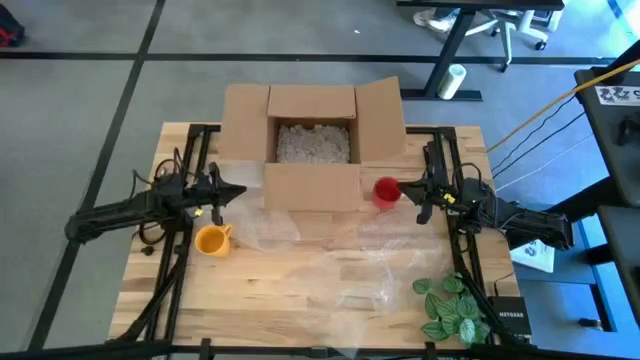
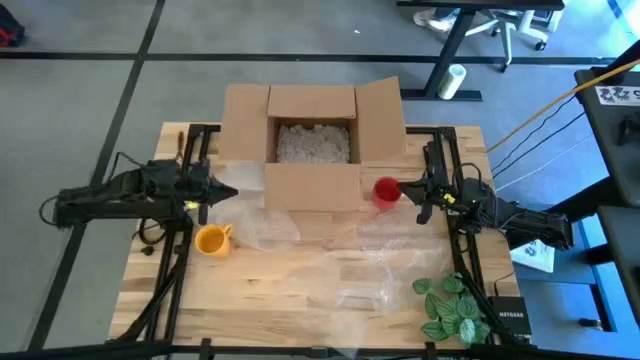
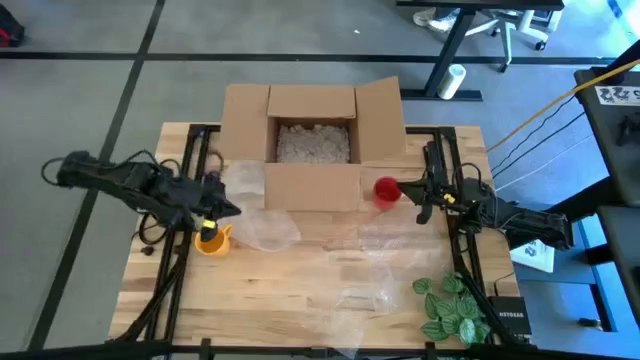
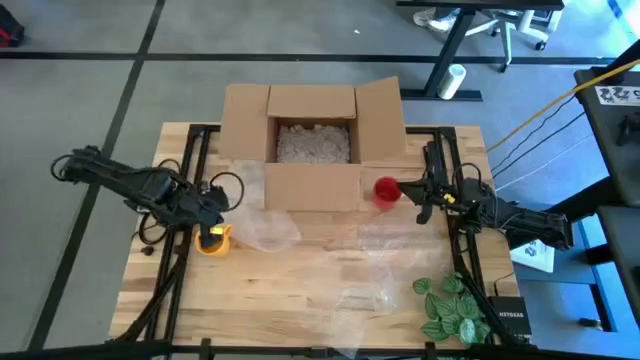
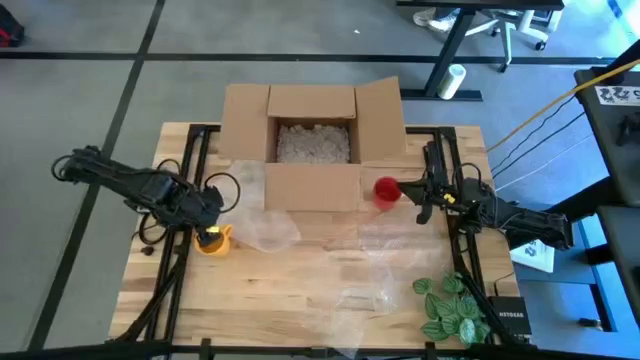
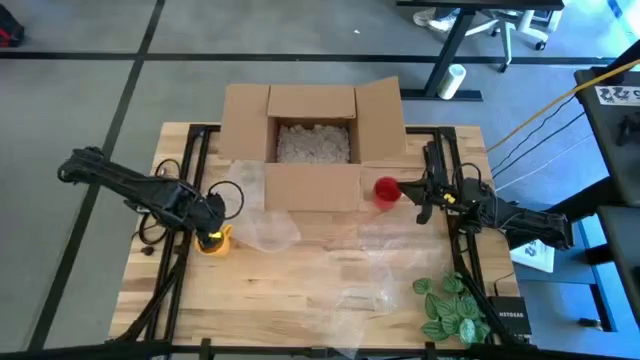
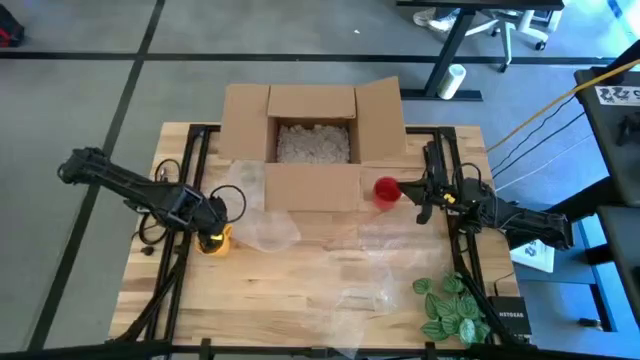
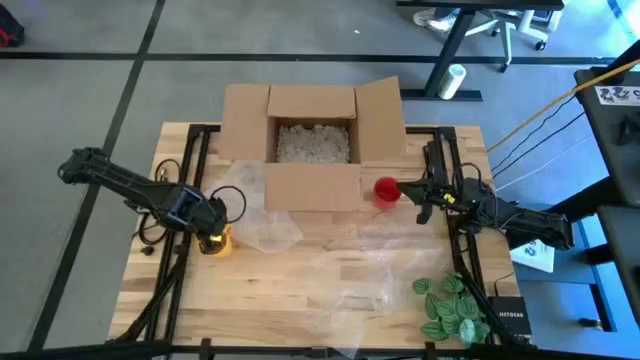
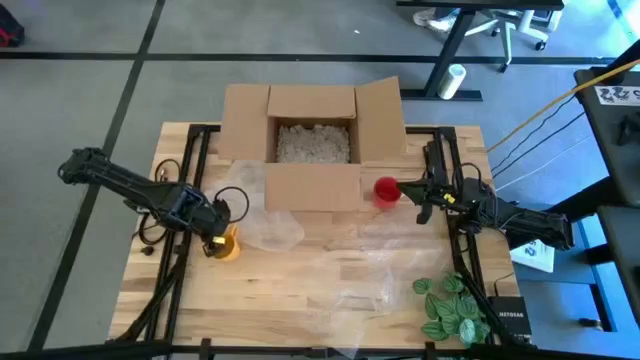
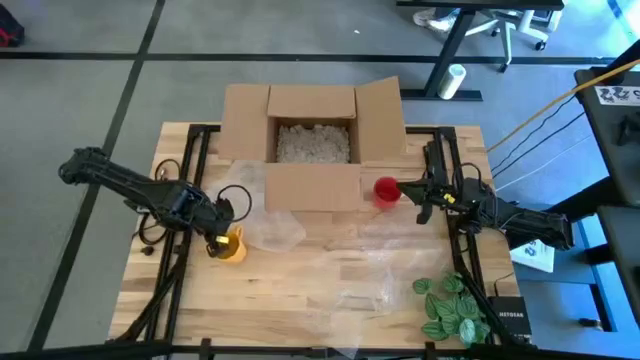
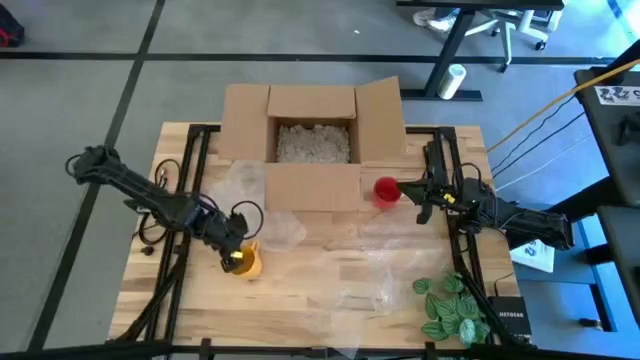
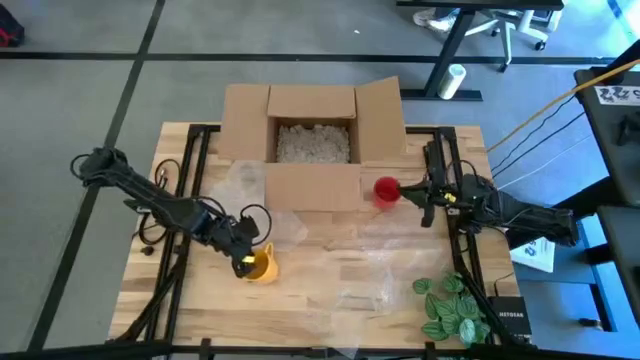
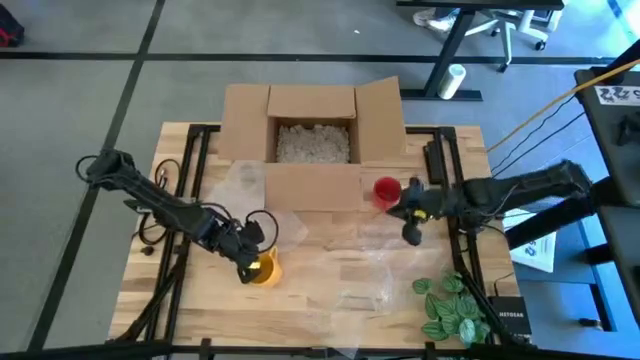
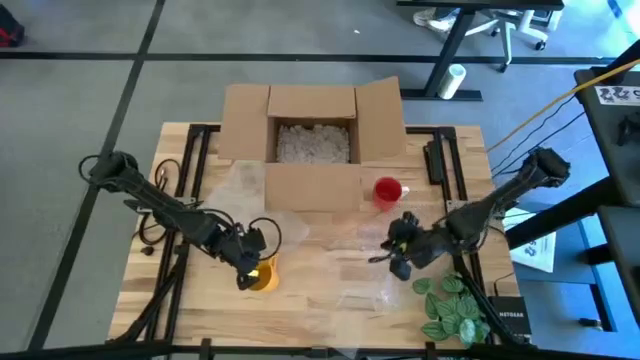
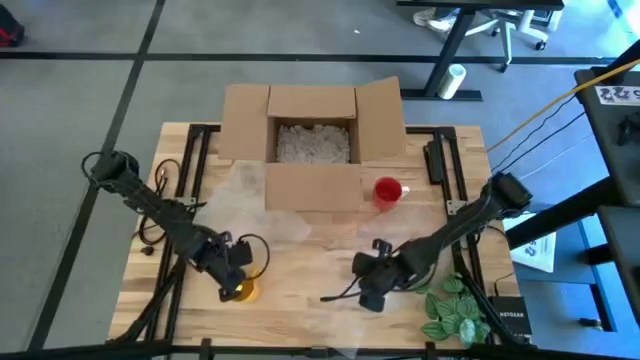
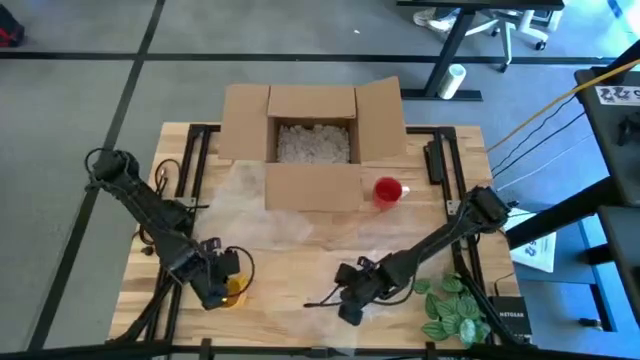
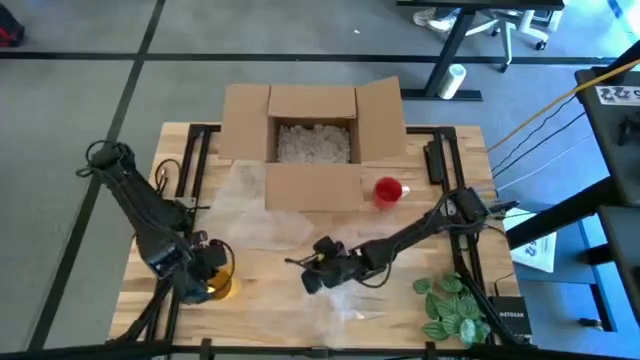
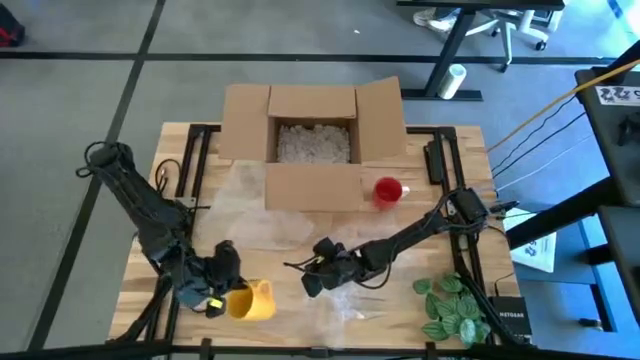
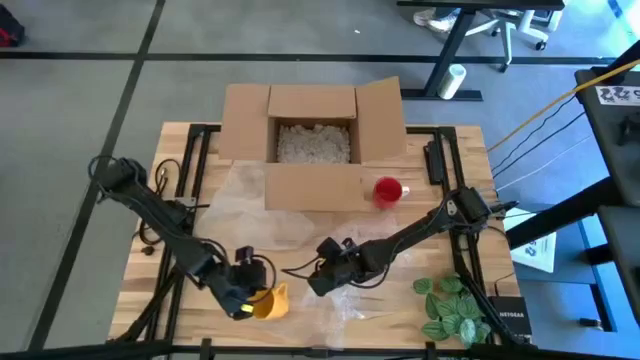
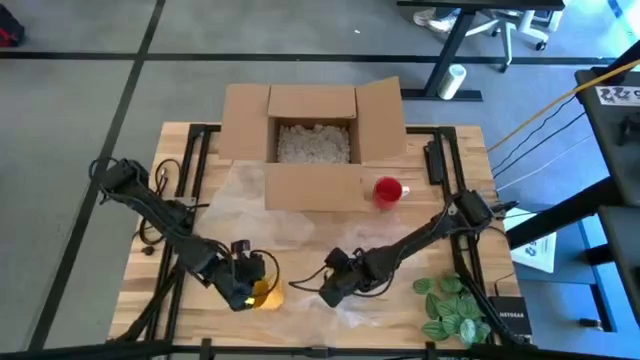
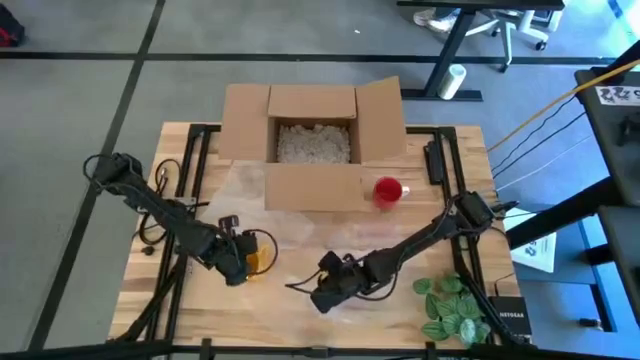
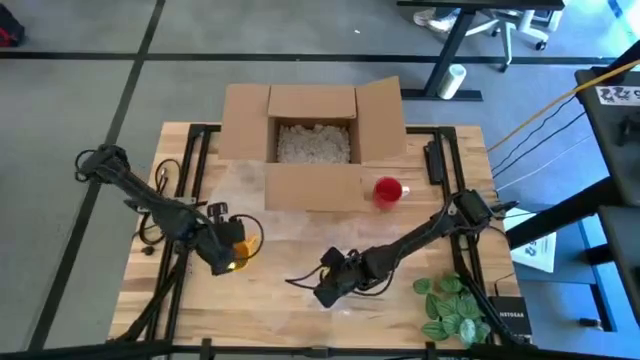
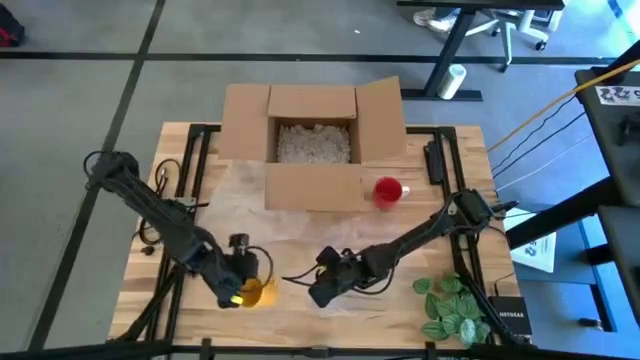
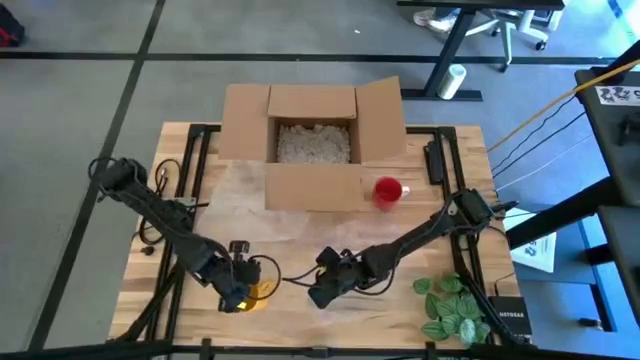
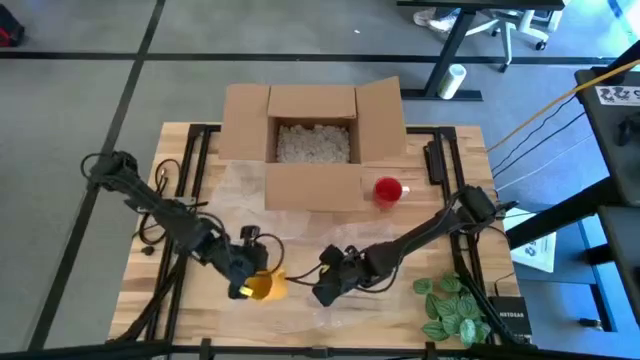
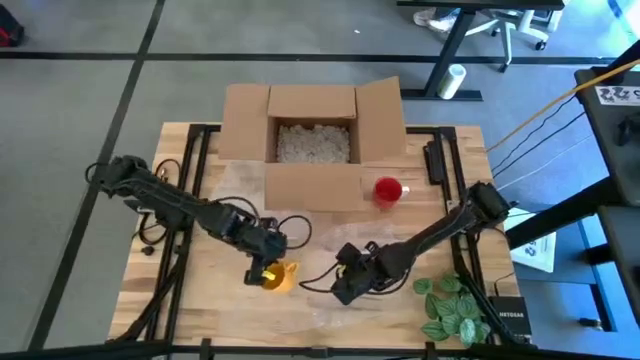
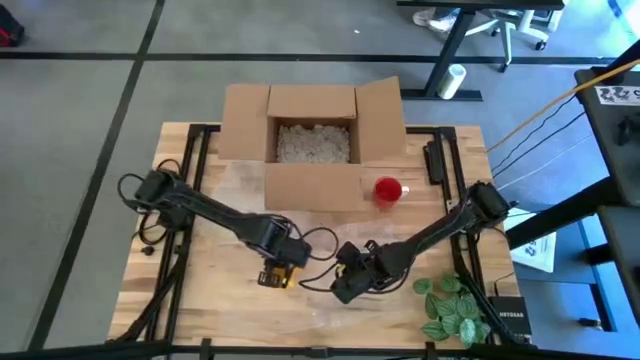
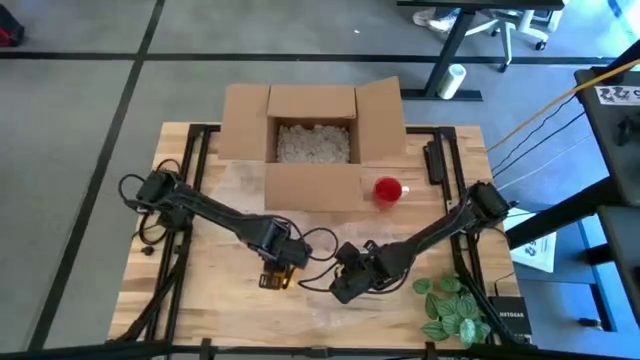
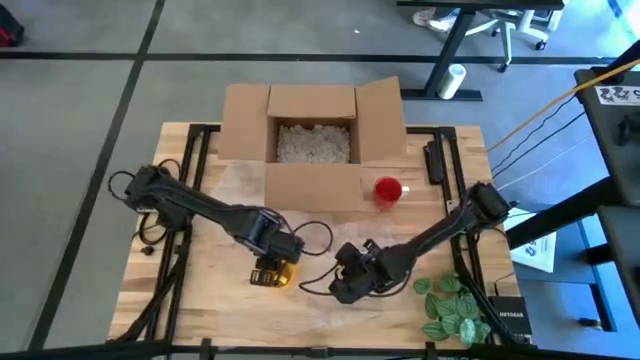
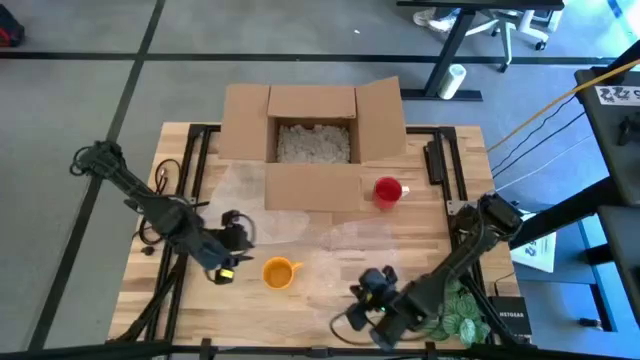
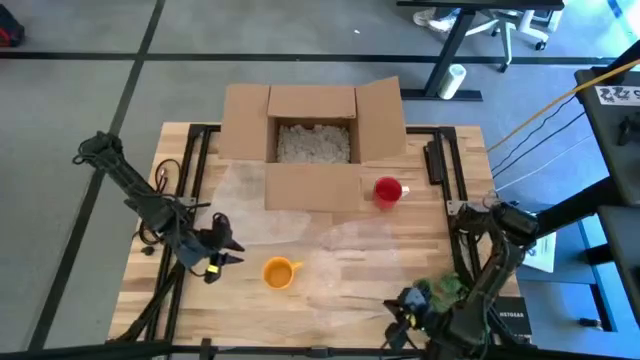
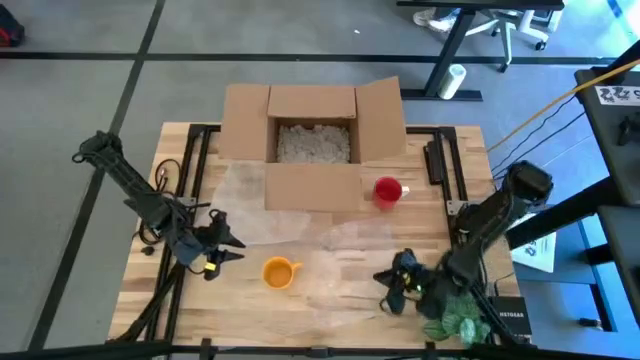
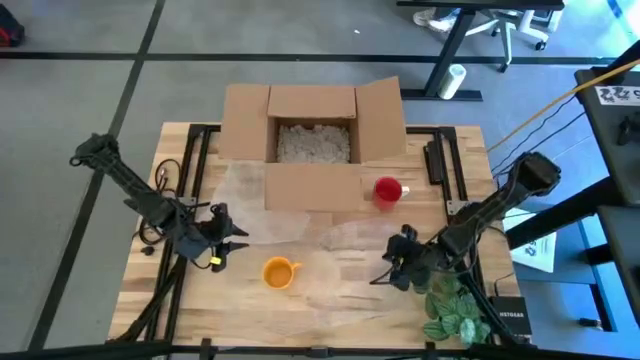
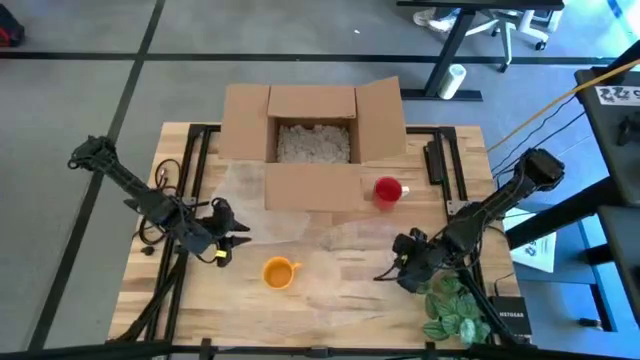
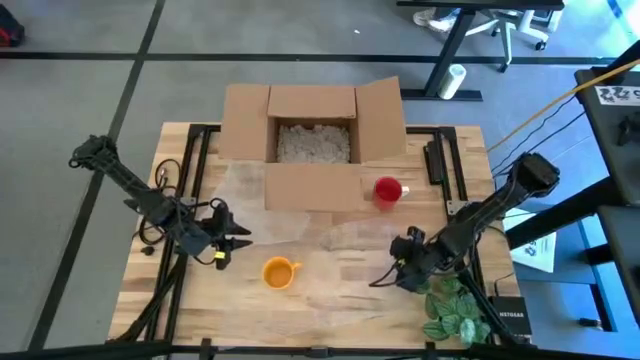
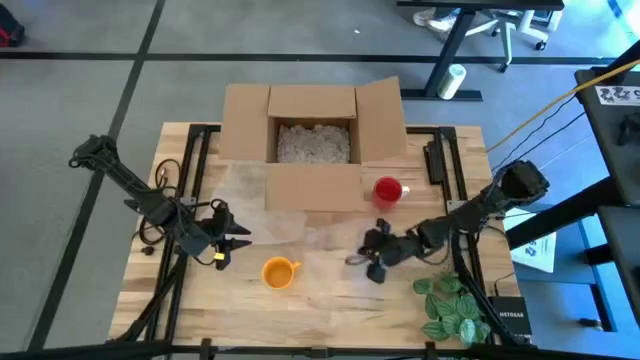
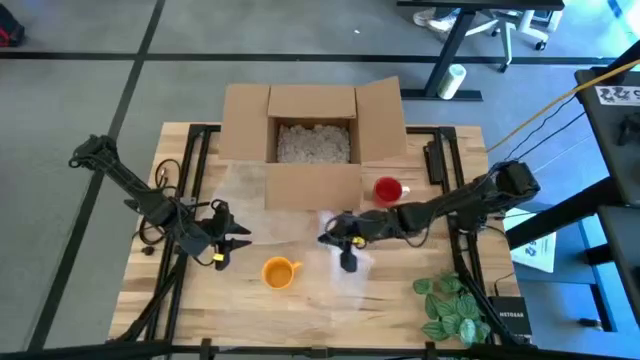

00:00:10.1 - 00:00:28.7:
Task: wrap mug
Wrap the yellow mug using the bubble wrap

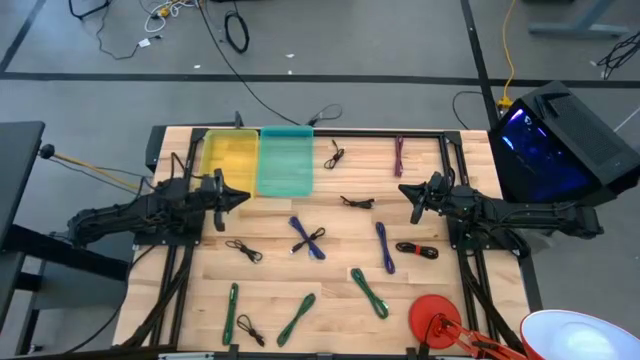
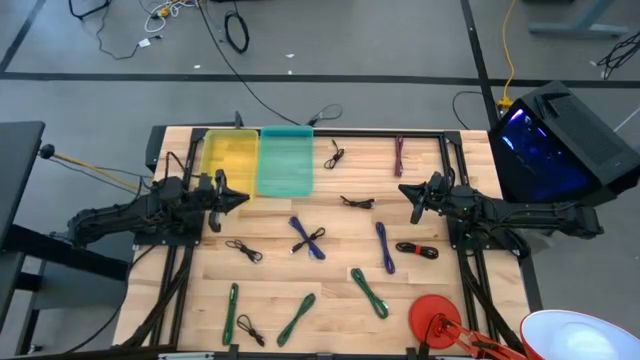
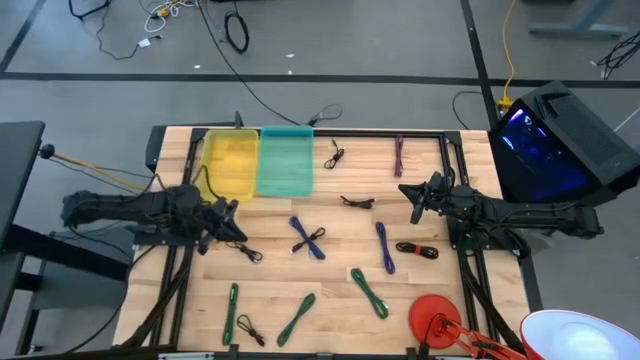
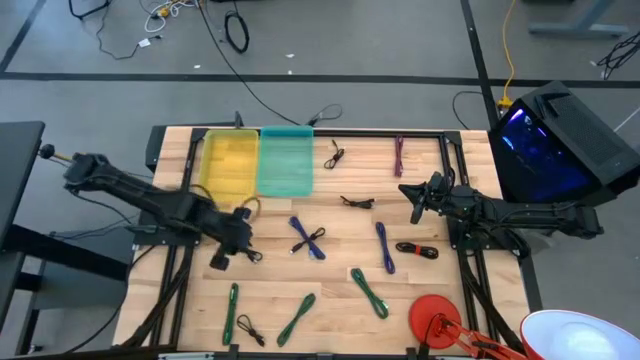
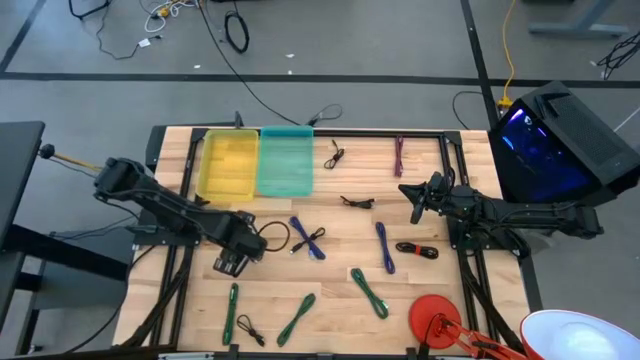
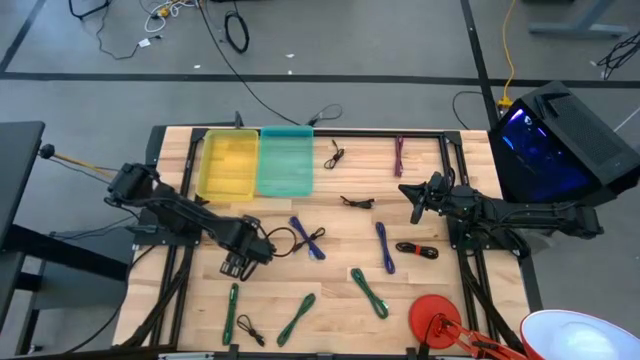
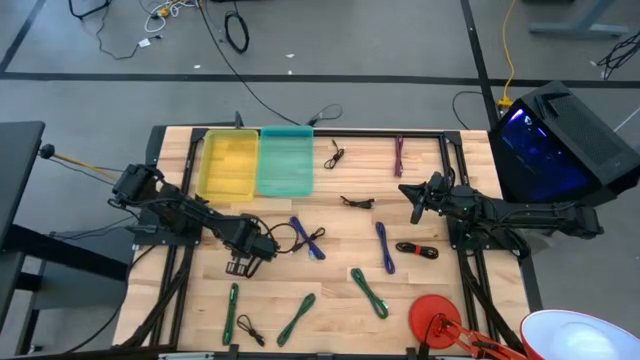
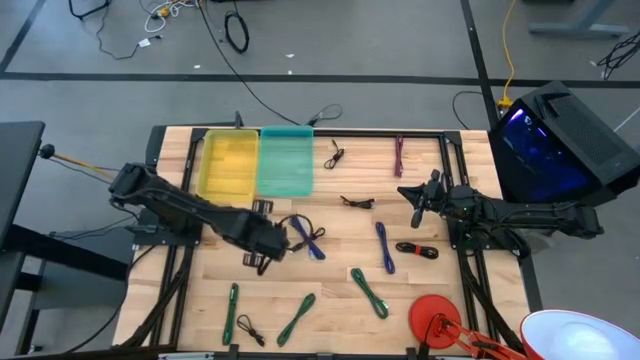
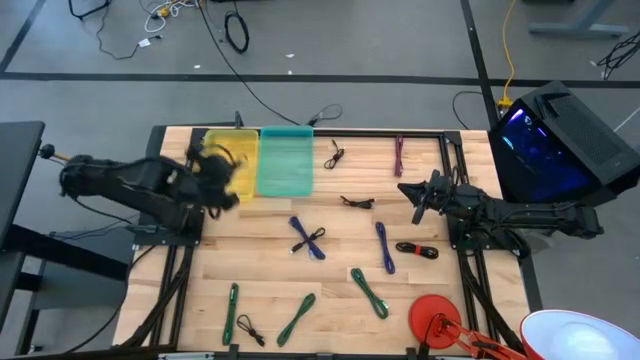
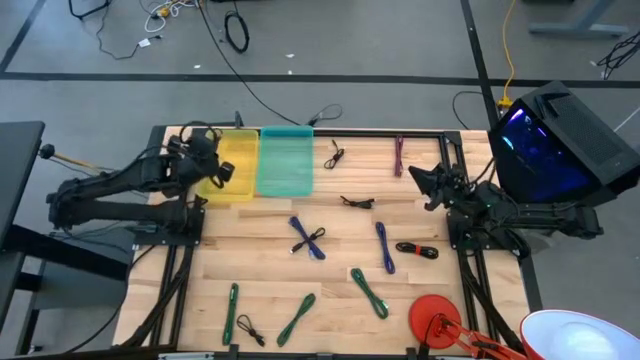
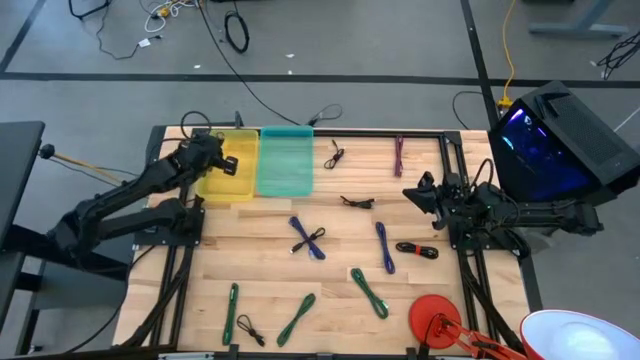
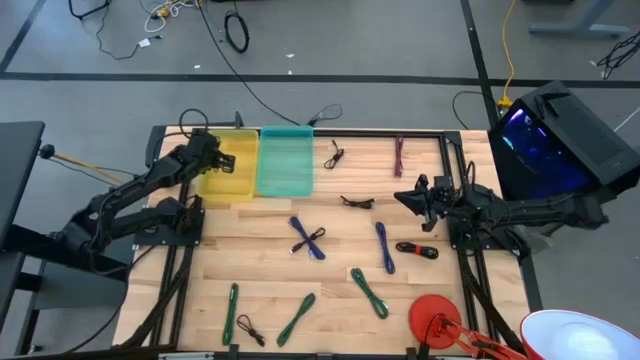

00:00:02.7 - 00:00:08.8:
Task: Pick & Place USB Port
Put the black charger cable into the yellow bin
